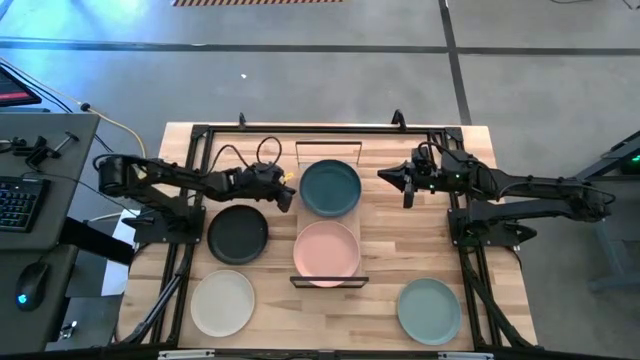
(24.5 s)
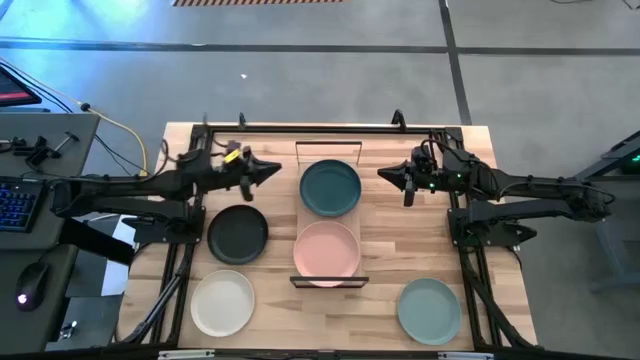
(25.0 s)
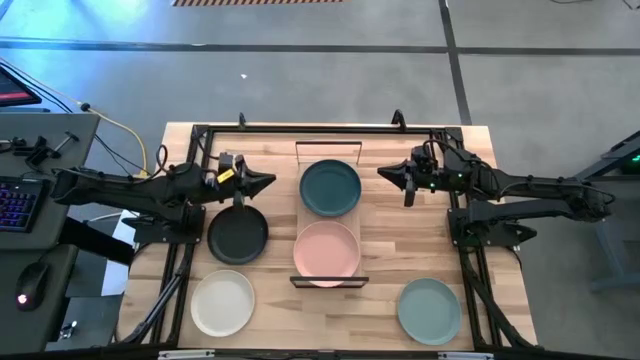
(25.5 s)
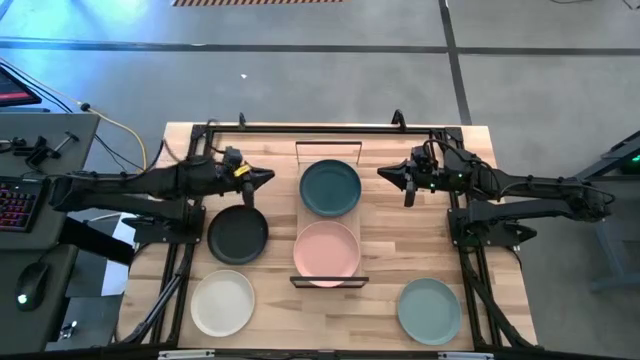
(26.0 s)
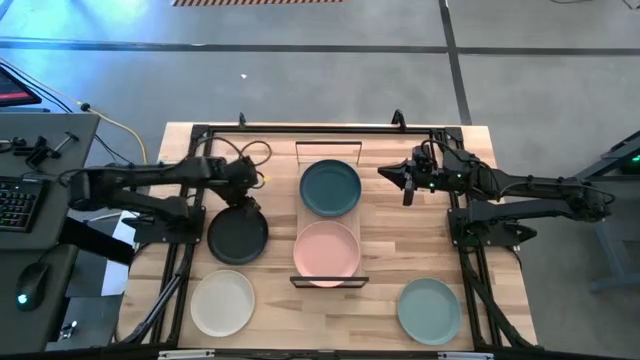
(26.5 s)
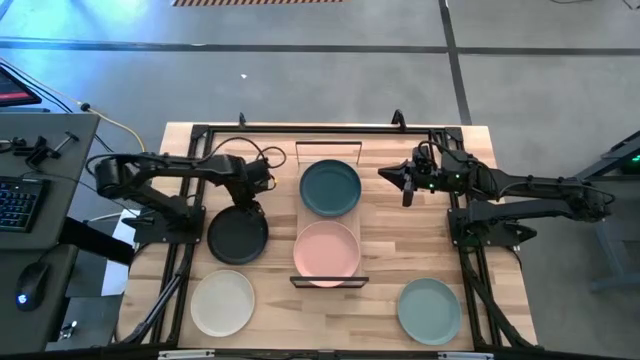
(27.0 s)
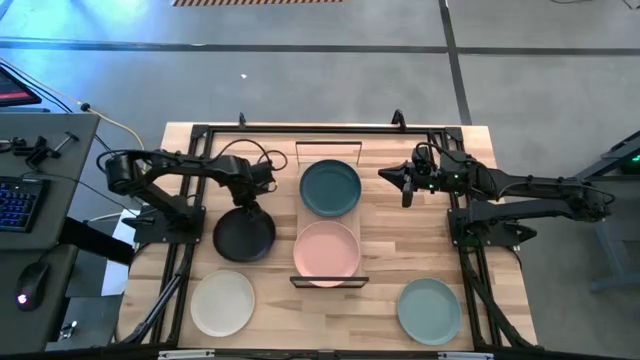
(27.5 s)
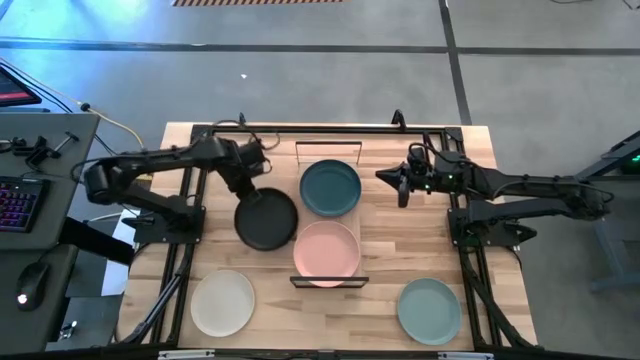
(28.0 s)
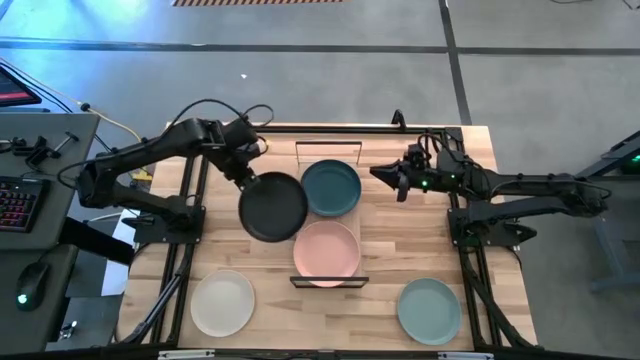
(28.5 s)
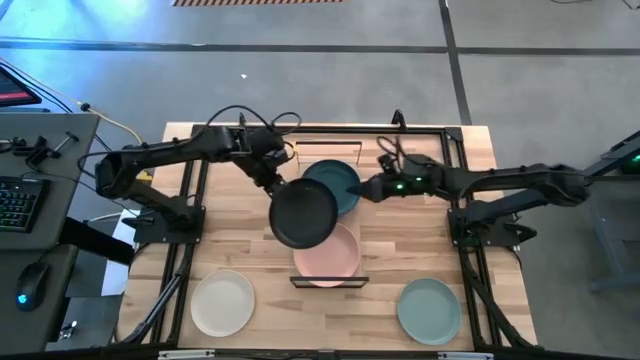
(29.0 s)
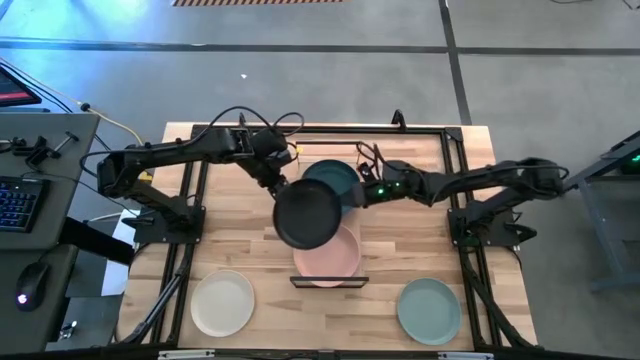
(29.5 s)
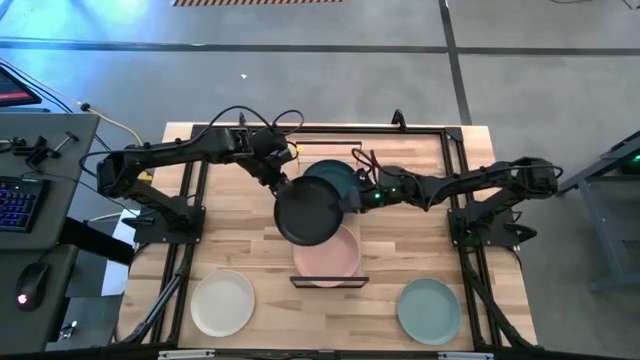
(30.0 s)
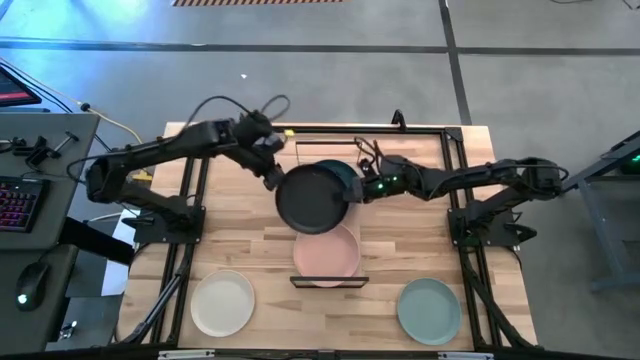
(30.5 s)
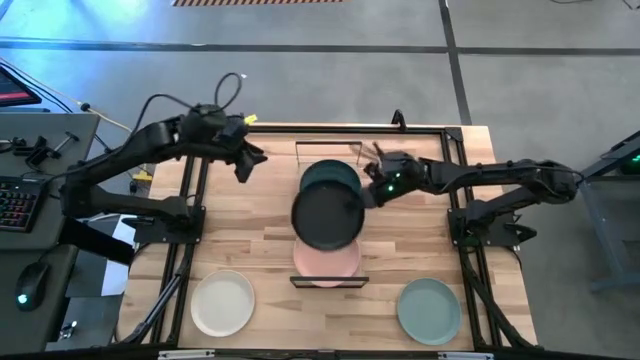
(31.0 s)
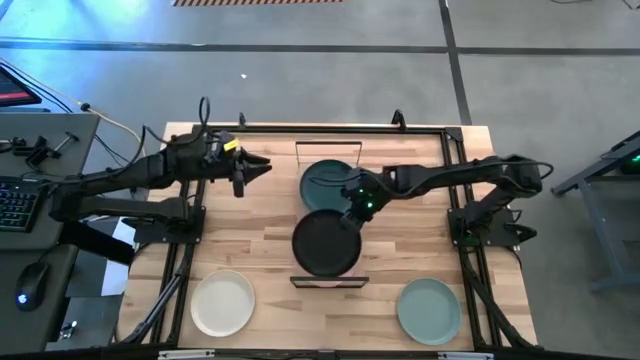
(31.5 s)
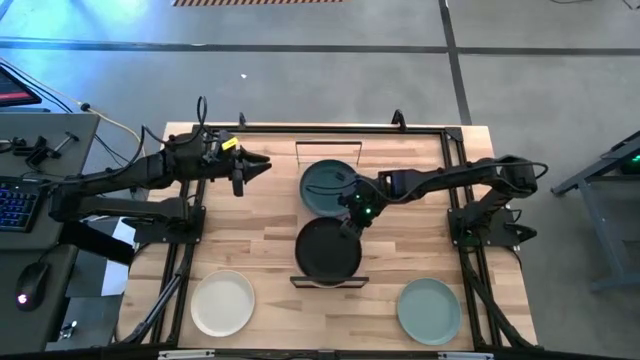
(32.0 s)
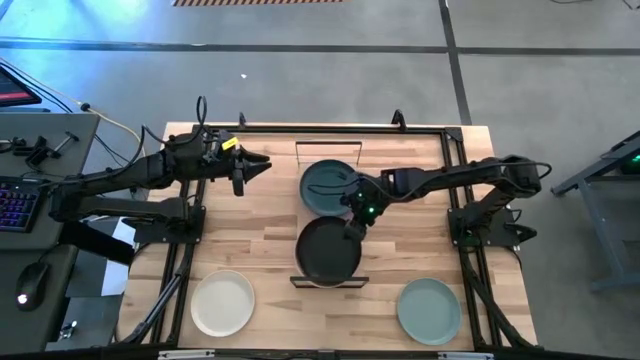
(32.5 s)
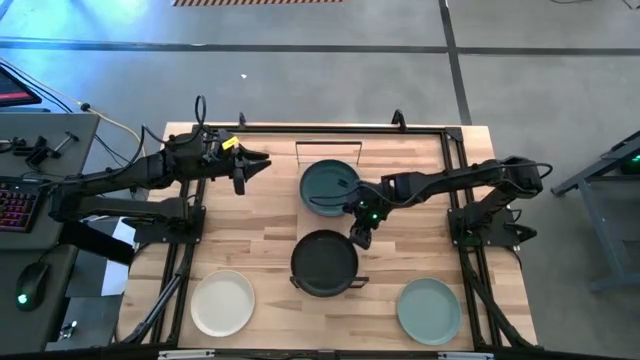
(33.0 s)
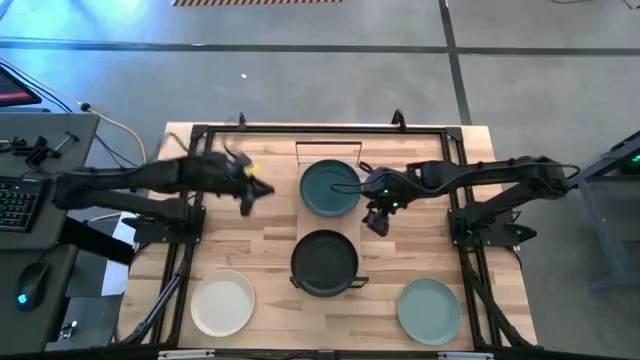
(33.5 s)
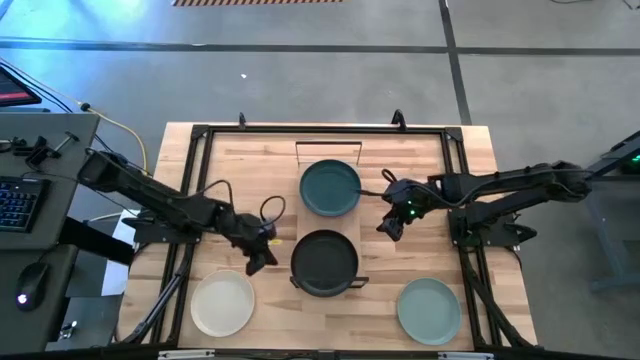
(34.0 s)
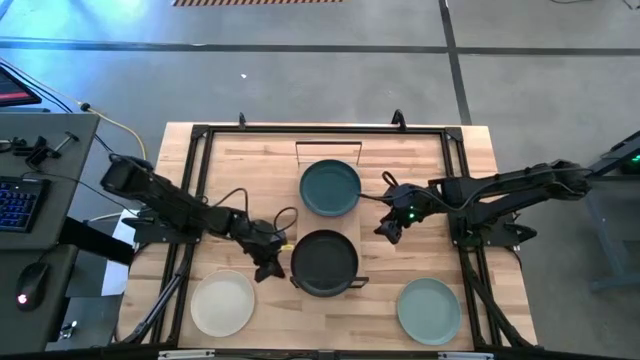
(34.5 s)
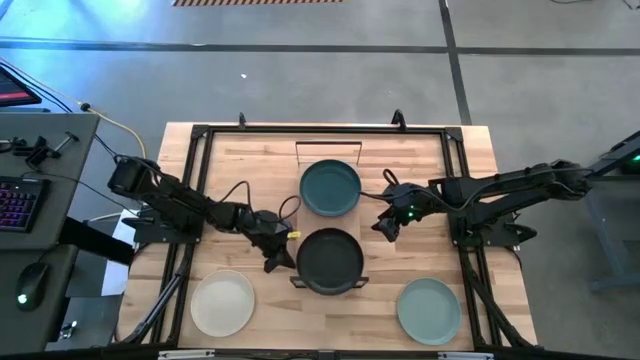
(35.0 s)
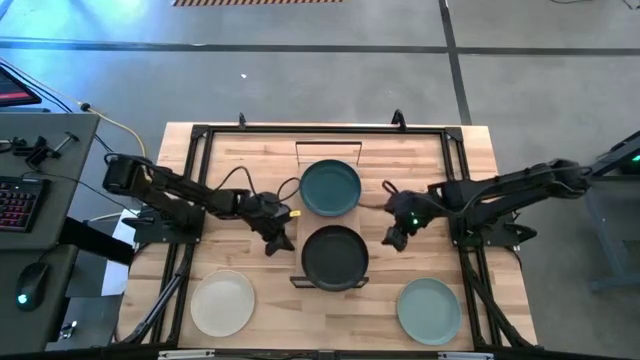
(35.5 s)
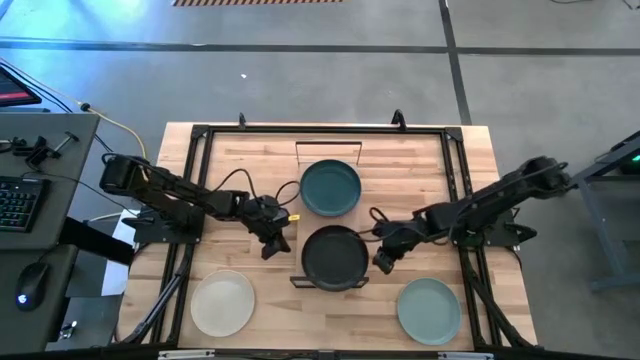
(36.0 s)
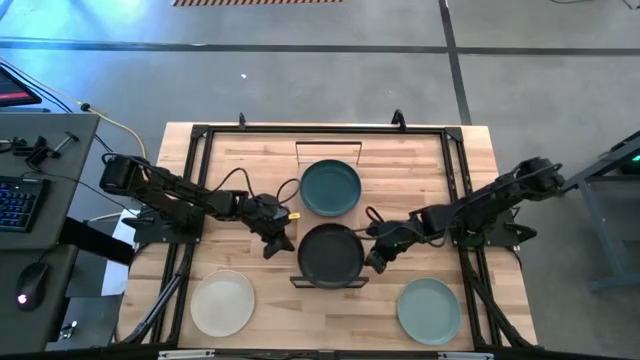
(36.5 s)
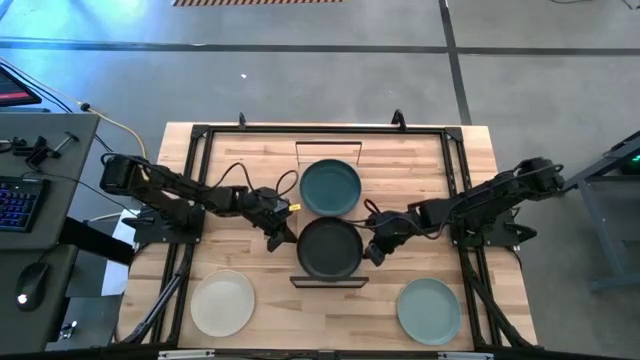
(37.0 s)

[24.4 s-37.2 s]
Task: Place and stack plates onto a shelf
Stack the black plate on top of the light brown plate on the shelf

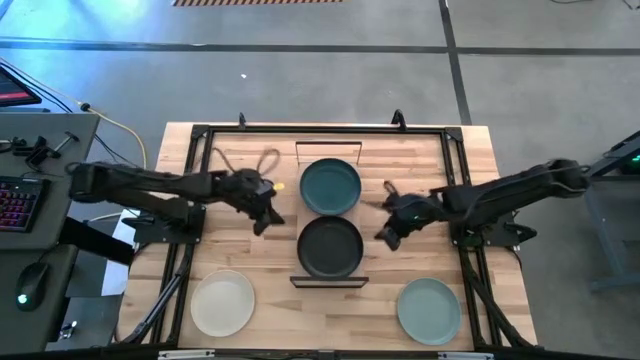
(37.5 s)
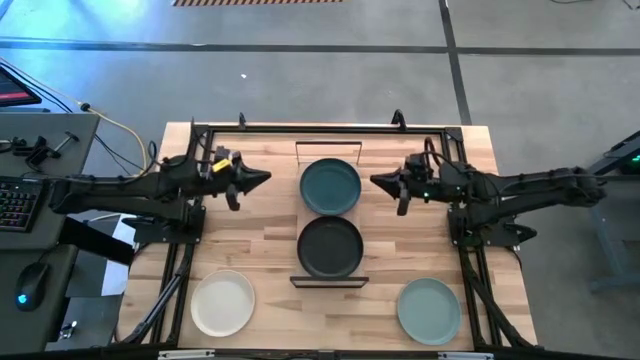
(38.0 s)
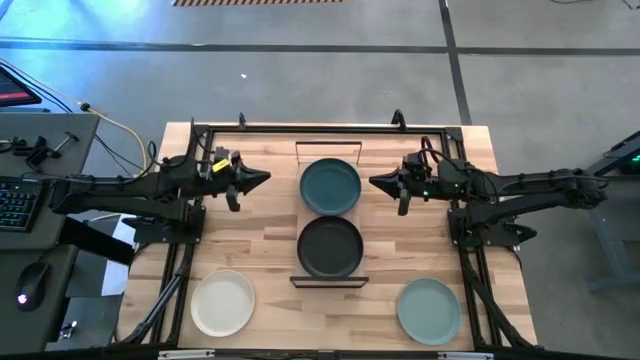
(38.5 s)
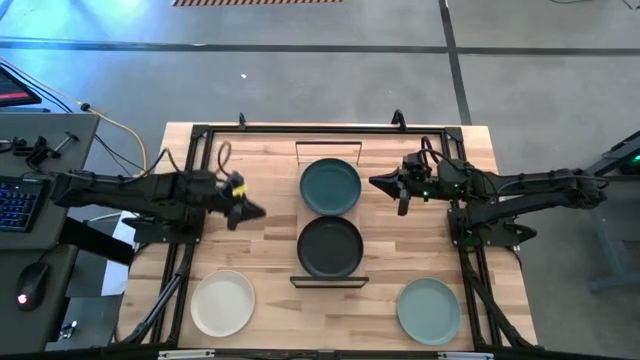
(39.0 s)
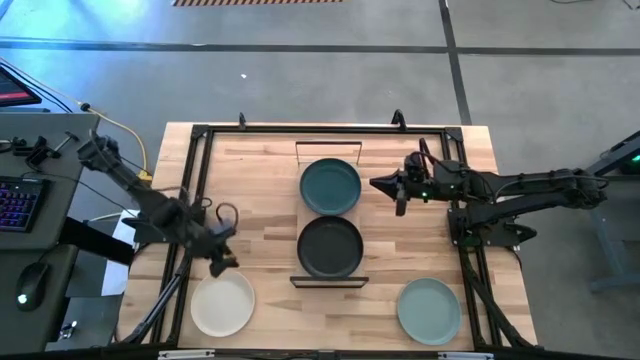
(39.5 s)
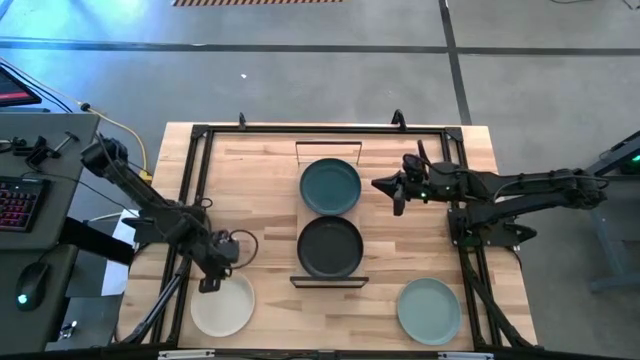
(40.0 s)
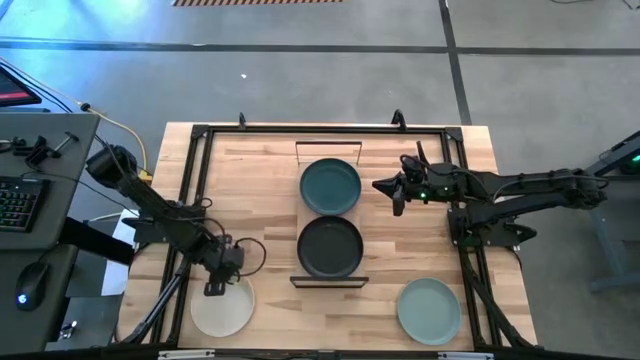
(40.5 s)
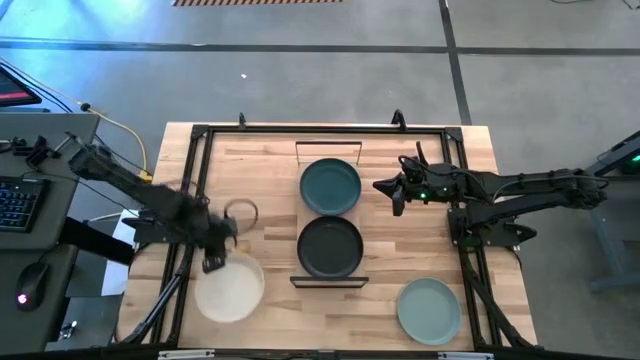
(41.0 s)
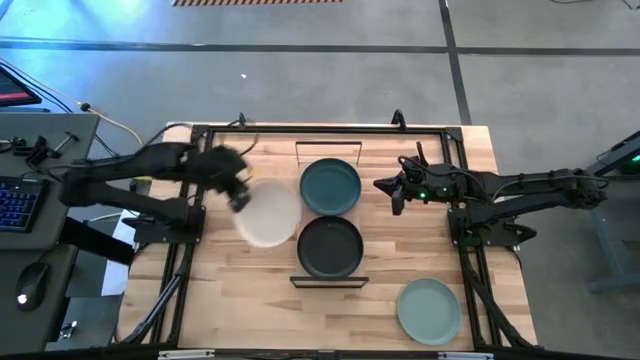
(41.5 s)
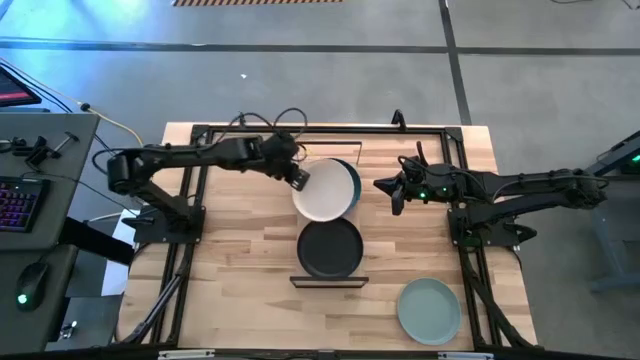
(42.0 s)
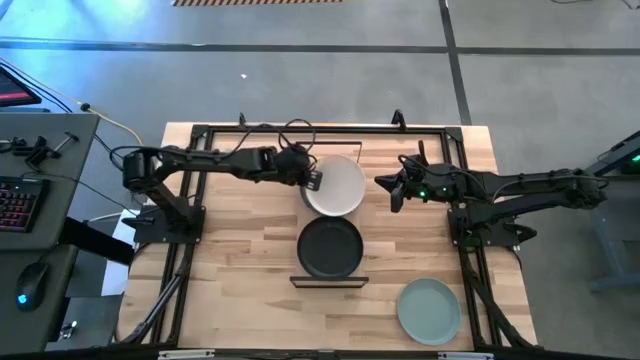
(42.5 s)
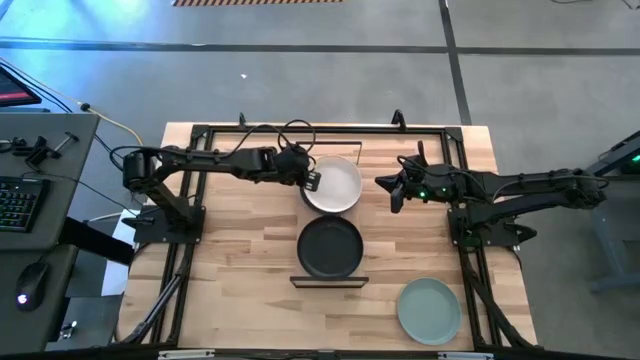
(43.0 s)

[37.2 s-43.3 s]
Stack the white plate on top of the dark green plate on the shelf

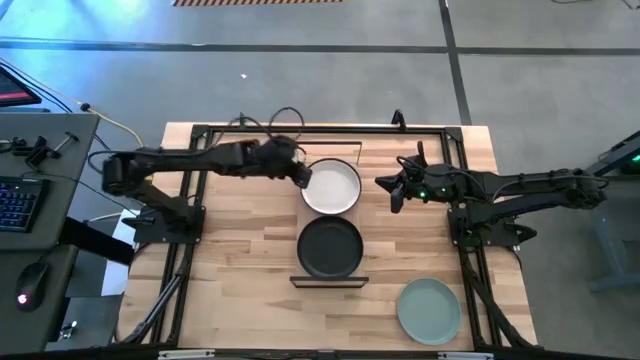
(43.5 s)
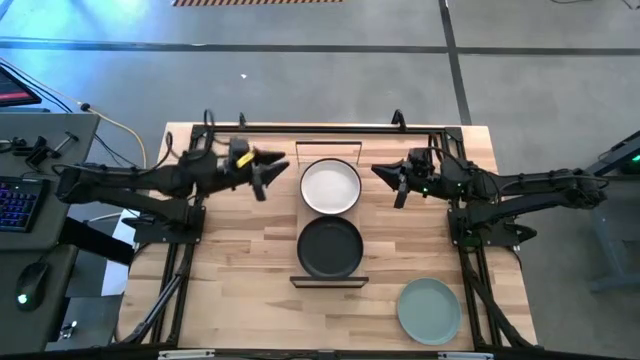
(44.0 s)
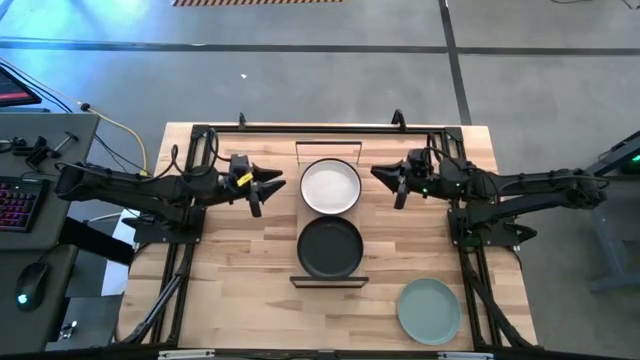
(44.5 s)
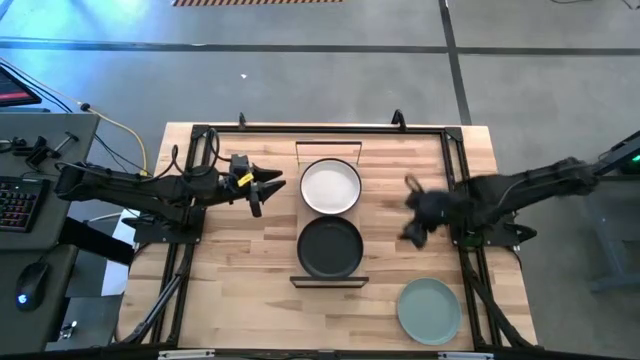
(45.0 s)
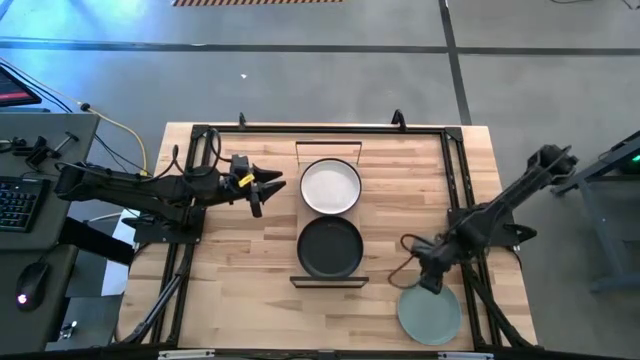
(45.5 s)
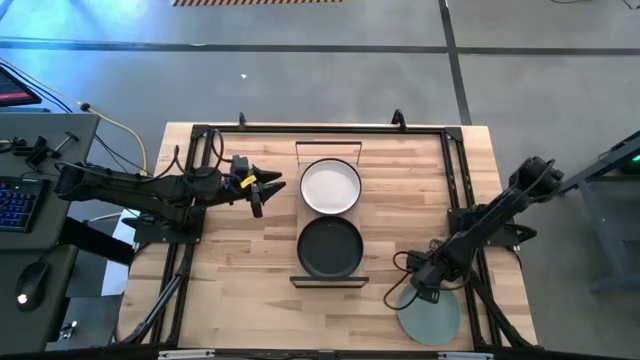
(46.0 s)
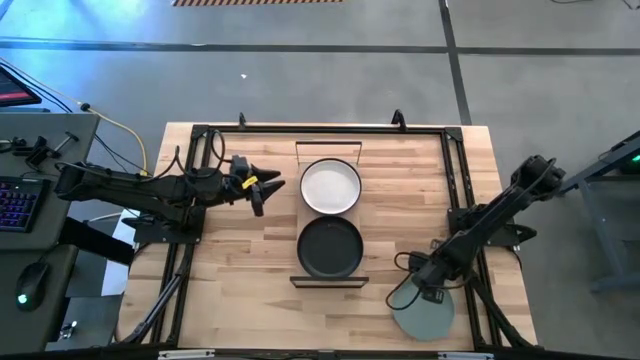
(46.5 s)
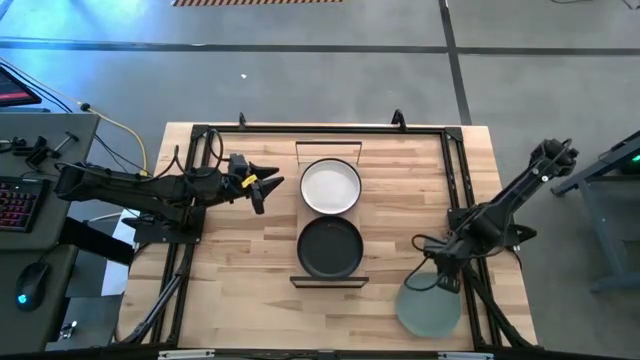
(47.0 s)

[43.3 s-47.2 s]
Stack the light blue plate on top of the black plate on the shelf
